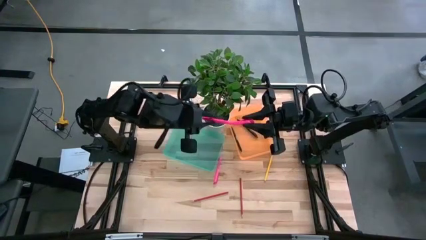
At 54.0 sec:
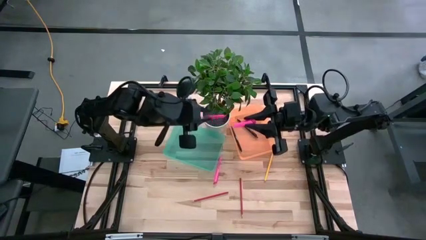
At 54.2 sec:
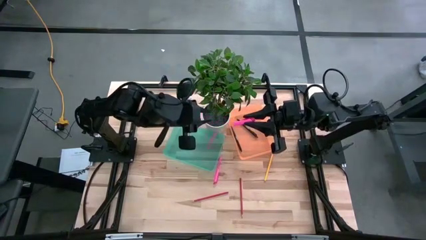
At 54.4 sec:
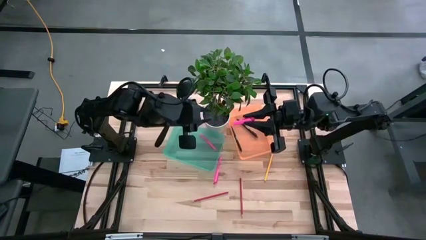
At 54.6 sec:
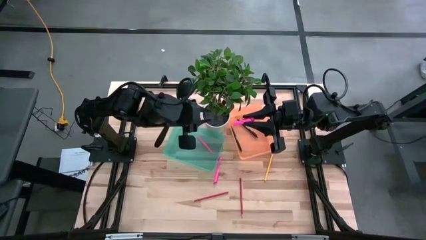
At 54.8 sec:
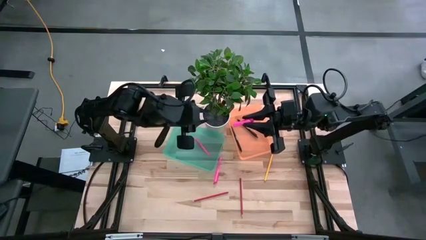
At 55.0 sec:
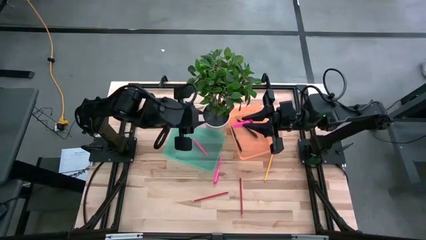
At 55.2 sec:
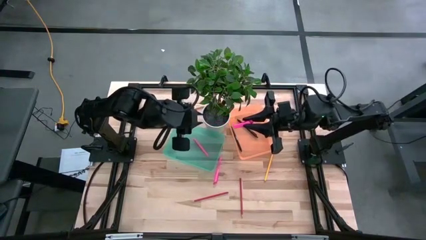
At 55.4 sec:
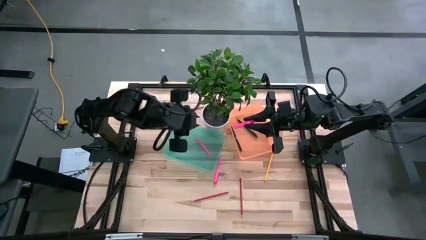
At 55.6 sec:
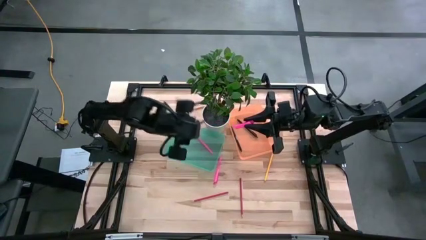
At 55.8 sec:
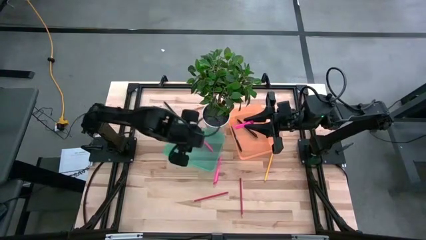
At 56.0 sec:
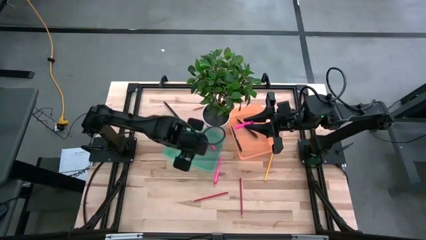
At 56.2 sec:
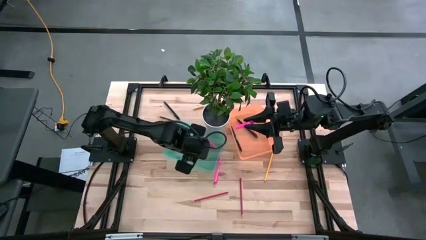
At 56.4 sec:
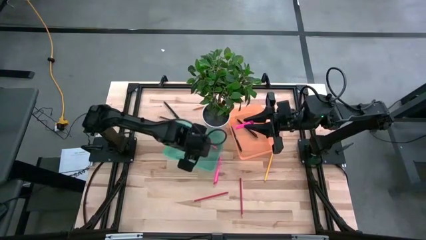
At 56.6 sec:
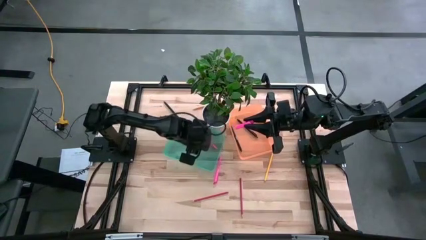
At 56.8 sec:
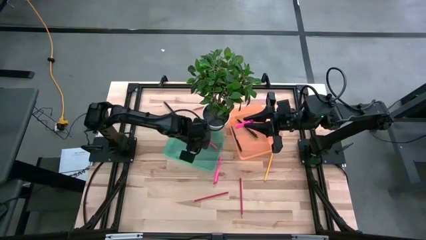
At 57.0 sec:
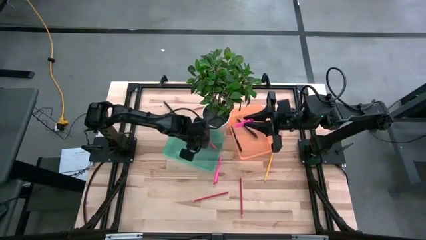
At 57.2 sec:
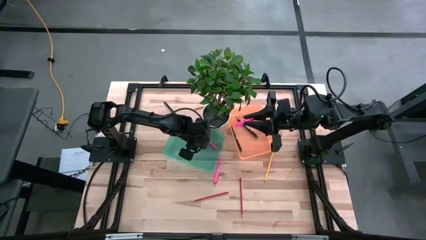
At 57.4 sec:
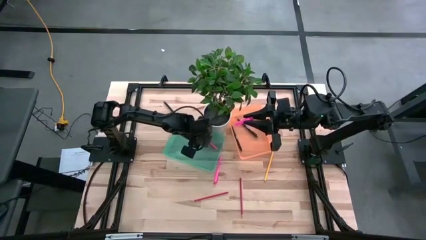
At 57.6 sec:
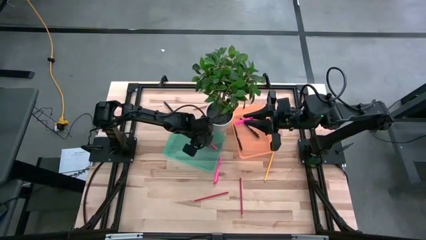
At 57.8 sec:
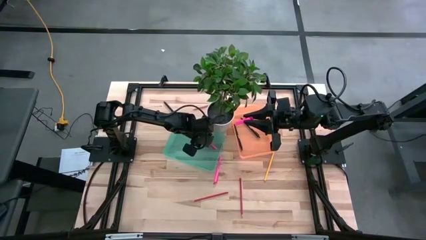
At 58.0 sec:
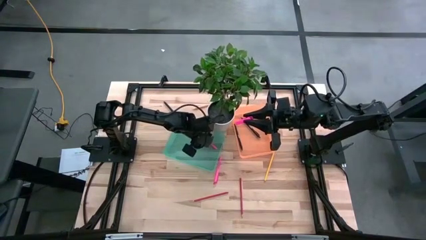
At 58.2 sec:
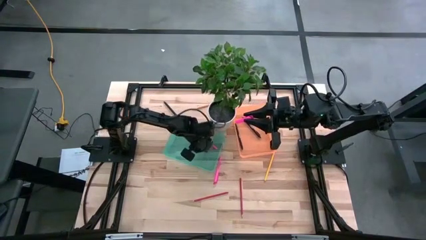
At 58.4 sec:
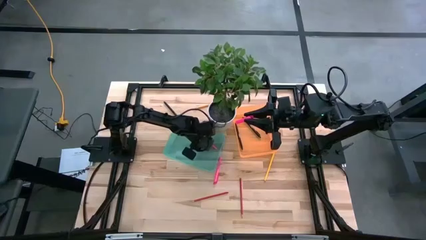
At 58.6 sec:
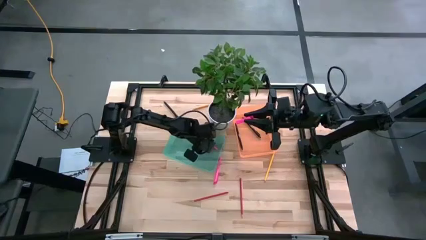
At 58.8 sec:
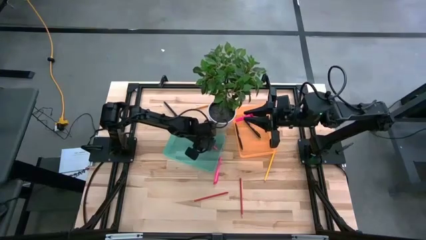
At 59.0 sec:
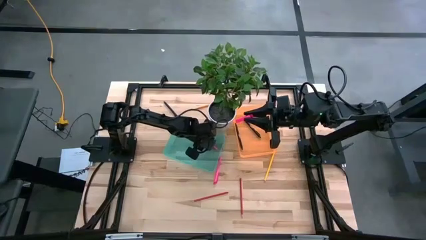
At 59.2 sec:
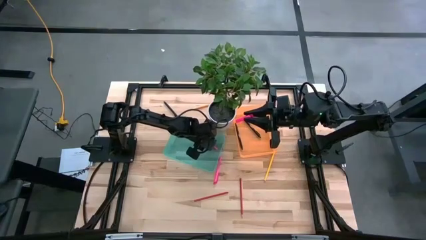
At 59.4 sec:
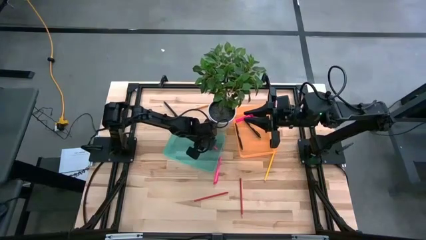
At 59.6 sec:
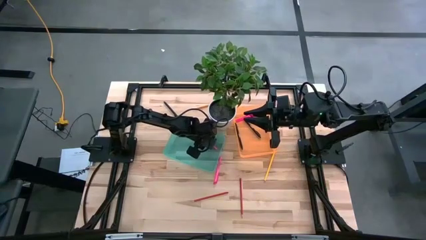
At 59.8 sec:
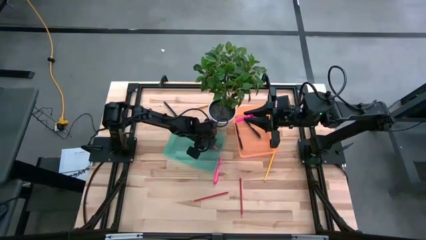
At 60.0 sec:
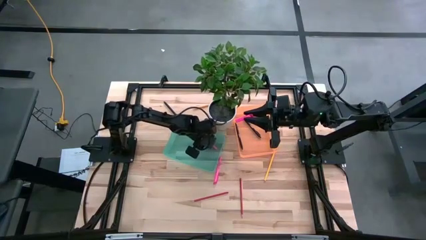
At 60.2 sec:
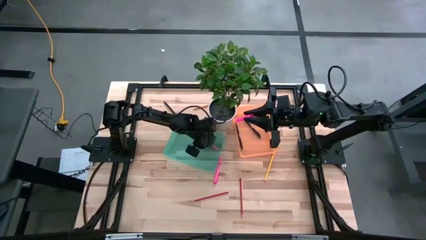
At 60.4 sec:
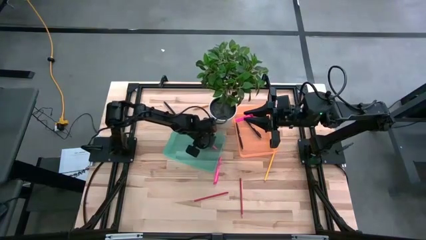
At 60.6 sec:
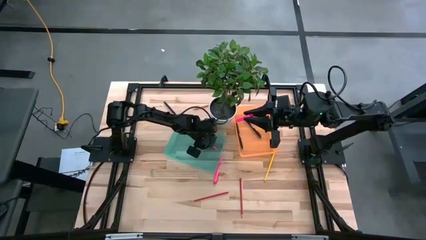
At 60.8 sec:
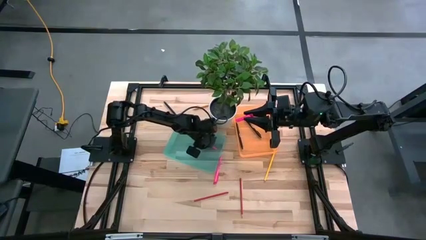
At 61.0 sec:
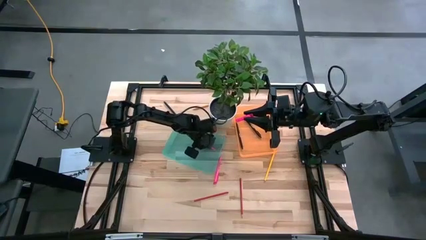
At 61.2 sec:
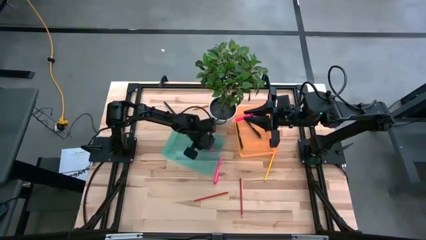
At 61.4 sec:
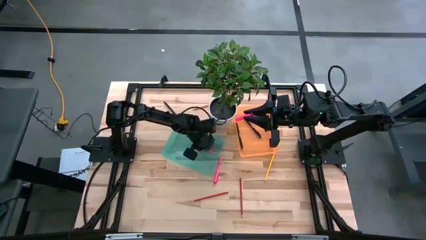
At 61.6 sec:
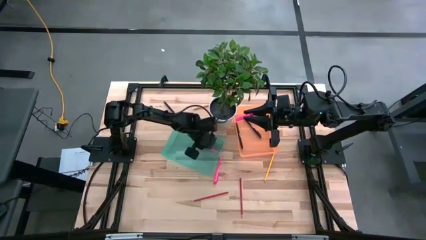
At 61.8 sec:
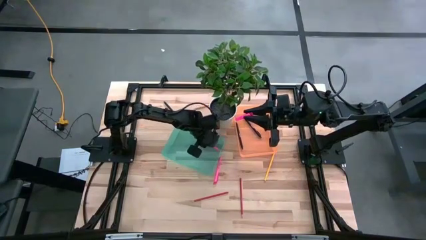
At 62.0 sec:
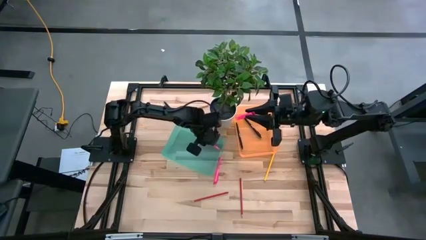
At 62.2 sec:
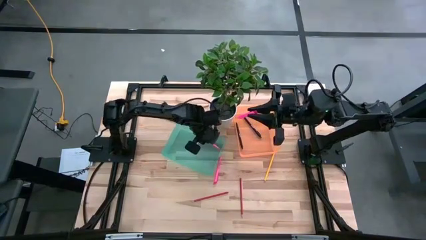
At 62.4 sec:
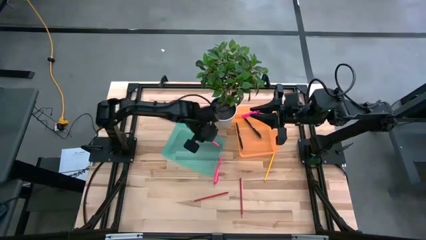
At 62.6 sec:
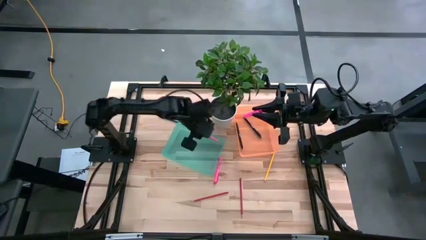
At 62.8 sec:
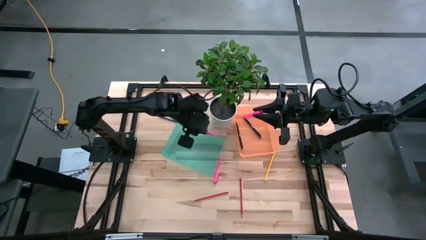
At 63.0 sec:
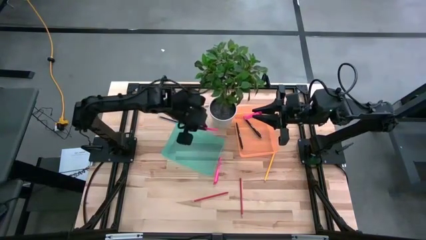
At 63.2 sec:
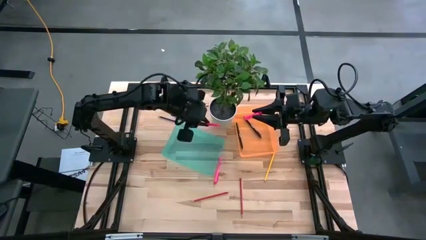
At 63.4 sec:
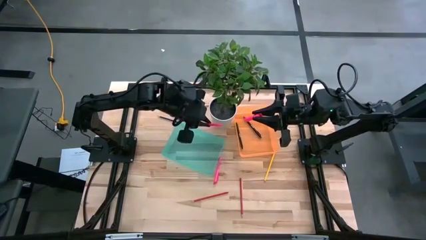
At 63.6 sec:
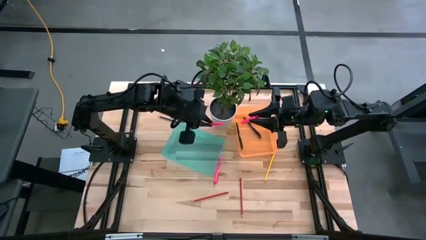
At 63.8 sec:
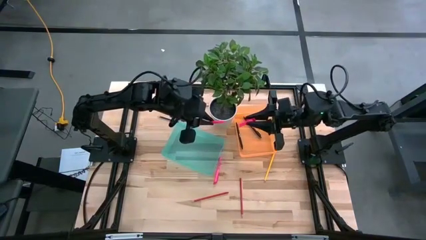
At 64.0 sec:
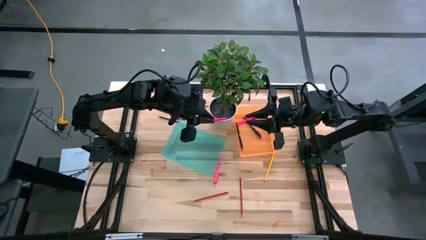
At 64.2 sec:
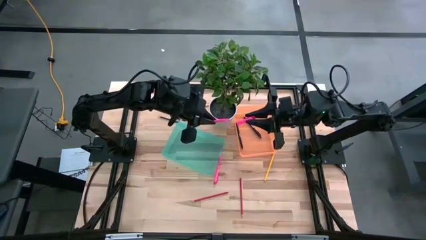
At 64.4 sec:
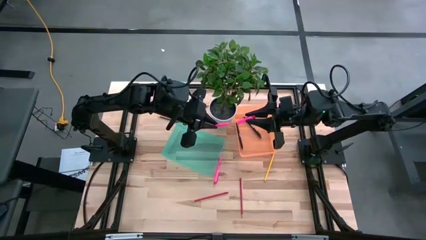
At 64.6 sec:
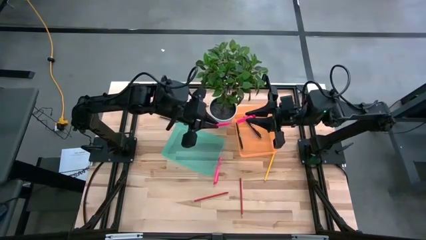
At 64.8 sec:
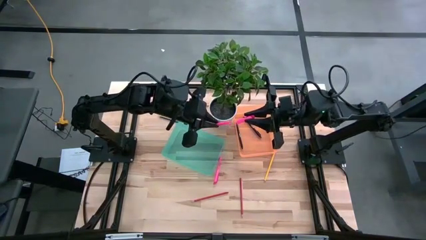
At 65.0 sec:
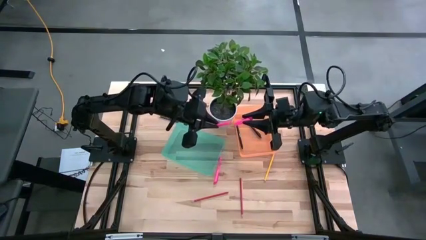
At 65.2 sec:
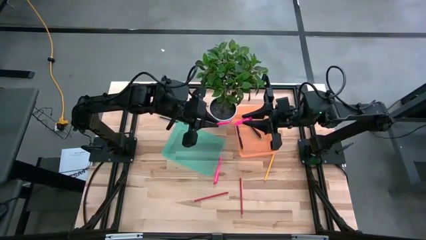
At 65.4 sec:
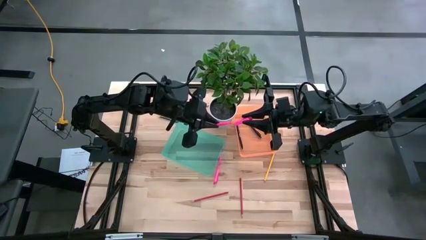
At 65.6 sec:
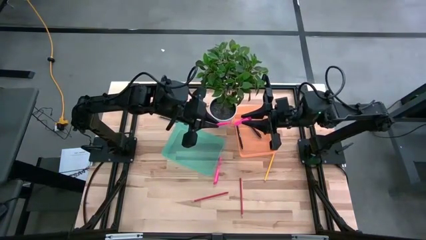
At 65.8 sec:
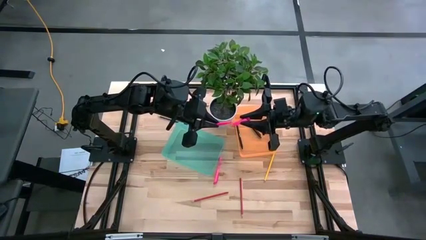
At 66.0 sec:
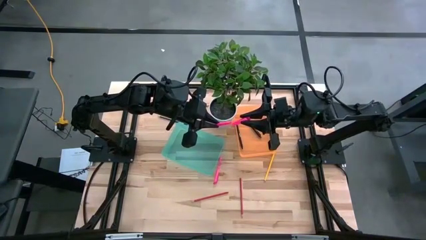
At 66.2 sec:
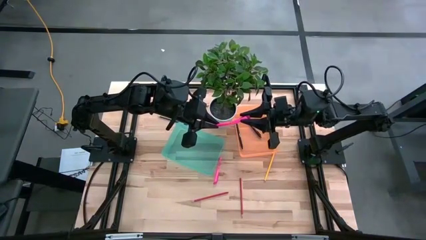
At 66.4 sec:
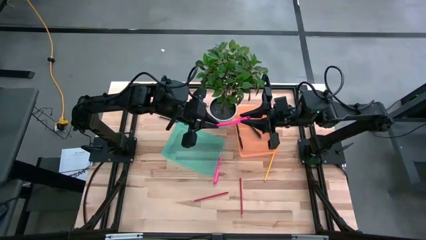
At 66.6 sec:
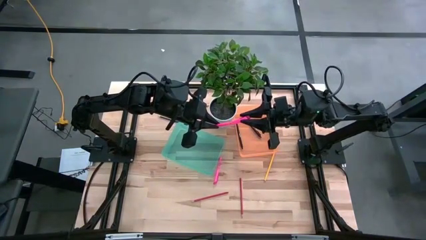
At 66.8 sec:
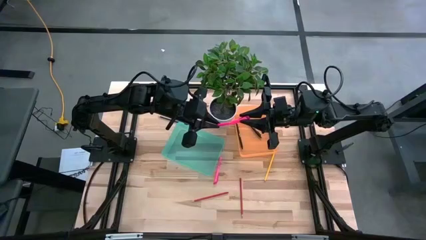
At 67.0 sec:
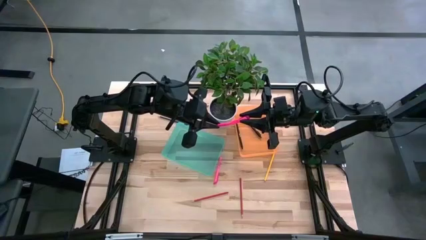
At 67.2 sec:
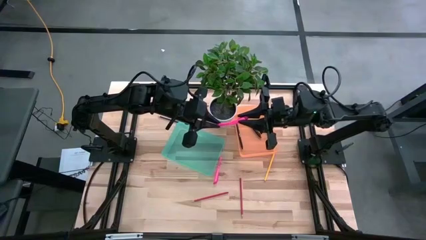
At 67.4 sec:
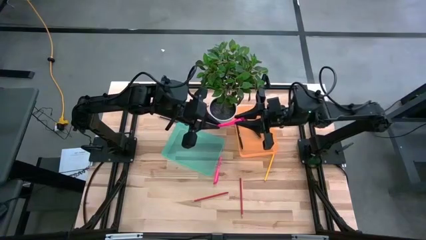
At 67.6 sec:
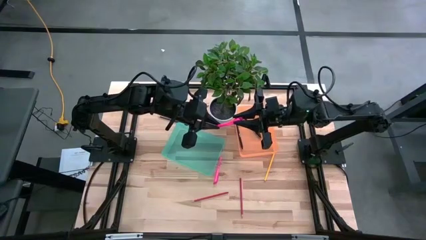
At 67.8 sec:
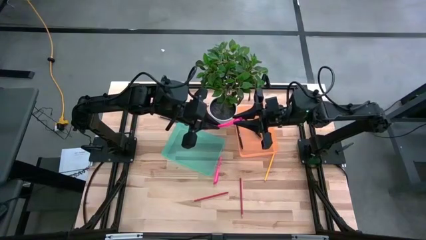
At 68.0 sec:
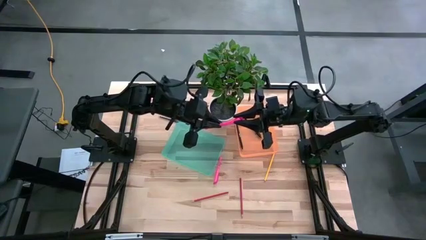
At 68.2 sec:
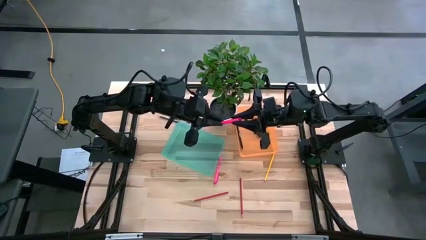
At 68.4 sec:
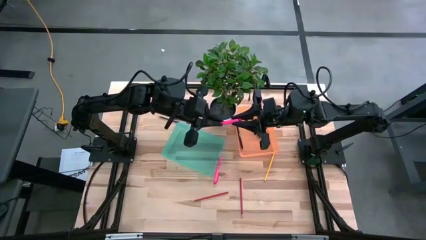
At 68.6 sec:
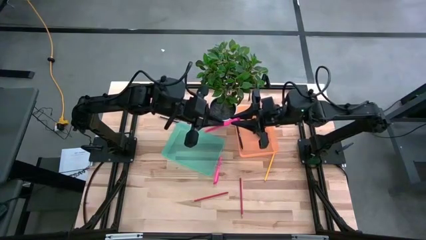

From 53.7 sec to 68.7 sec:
Task: Sort pens & pencils
Put the bottom pink pen into the orange bin
